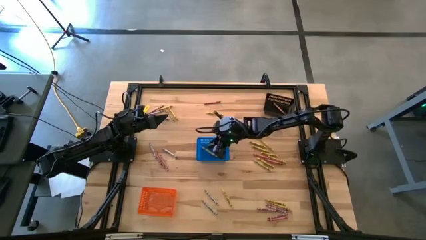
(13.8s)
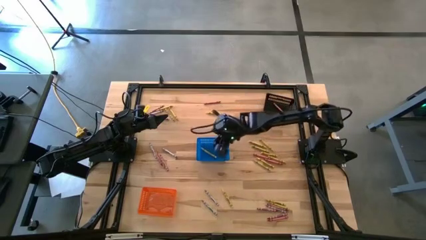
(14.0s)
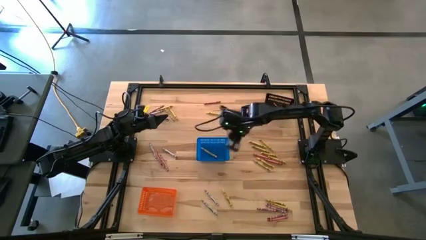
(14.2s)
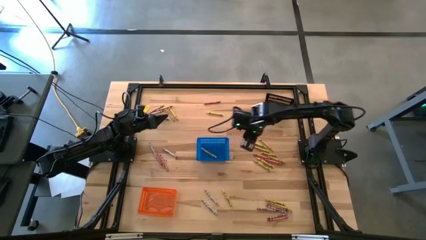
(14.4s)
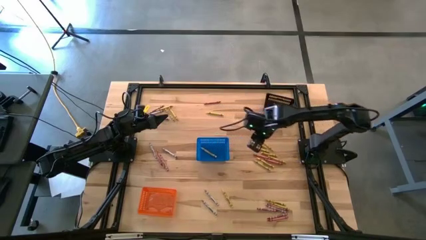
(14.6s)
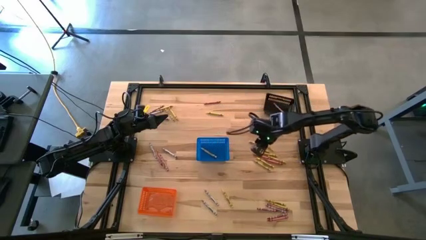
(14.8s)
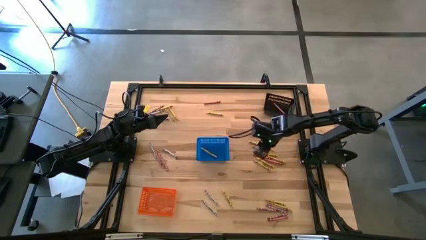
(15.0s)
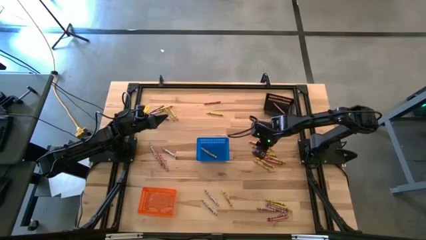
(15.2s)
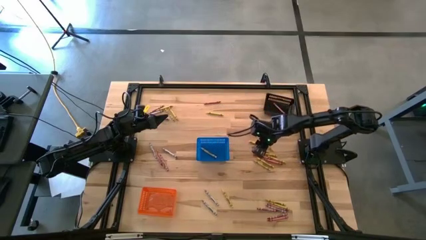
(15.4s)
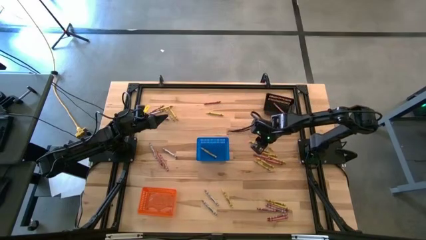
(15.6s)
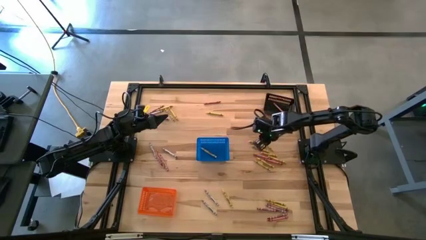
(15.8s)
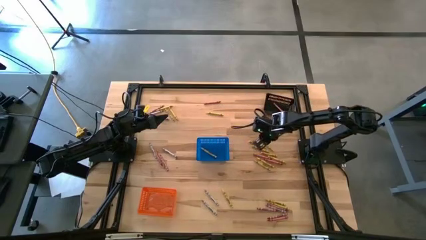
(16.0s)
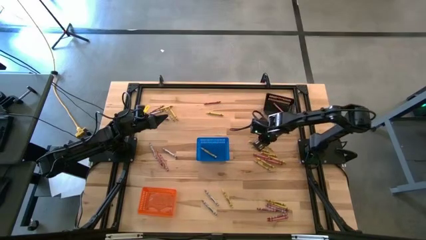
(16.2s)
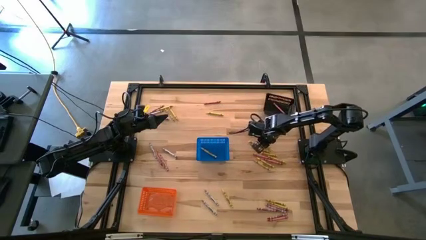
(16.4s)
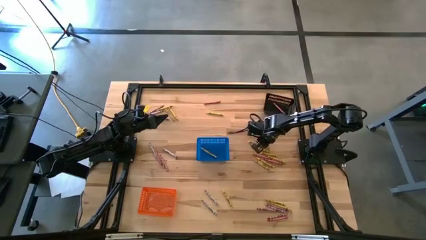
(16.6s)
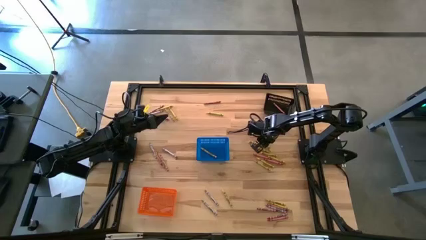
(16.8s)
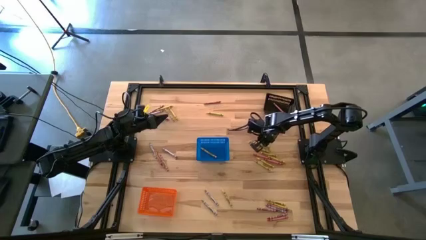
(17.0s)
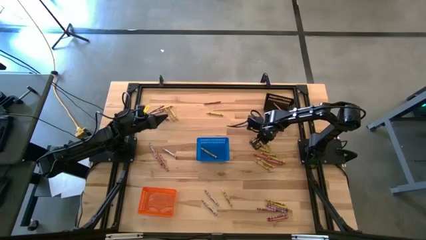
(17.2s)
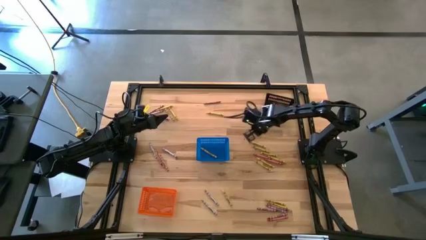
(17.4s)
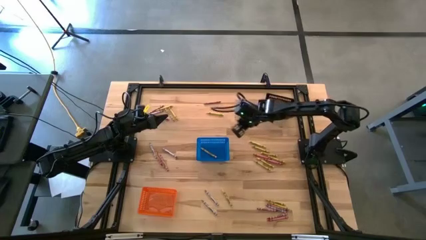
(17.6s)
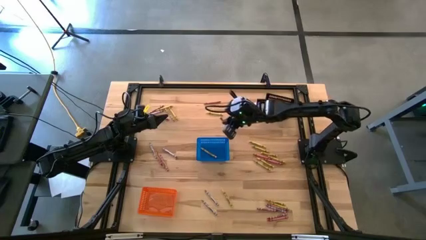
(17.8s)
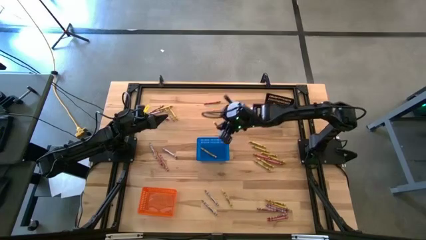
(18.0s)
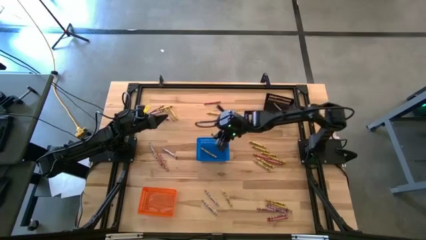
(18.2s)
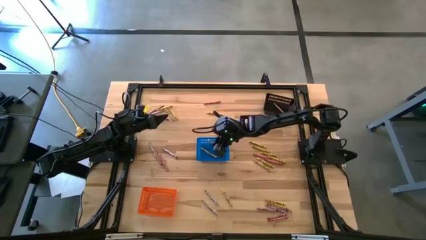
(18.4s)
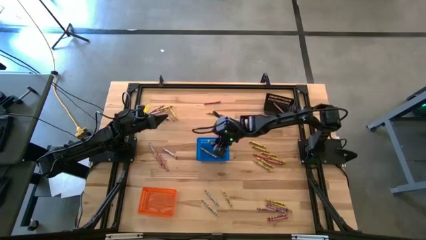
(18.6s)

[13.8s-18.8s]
Task: Sort crayons
Put the yellow crayon into the blue basket

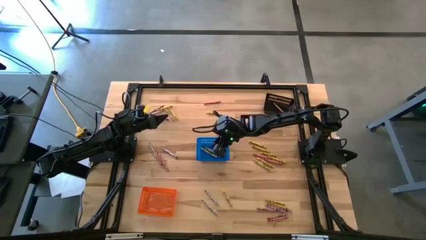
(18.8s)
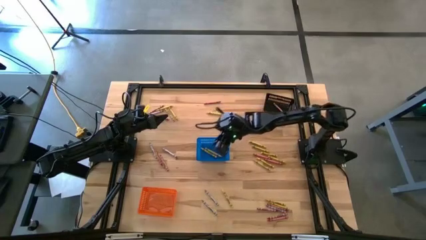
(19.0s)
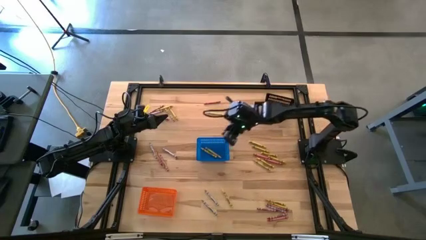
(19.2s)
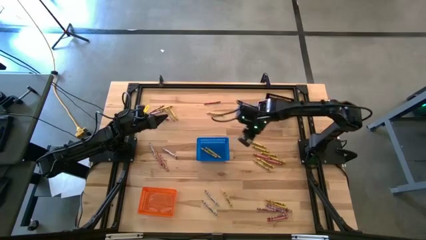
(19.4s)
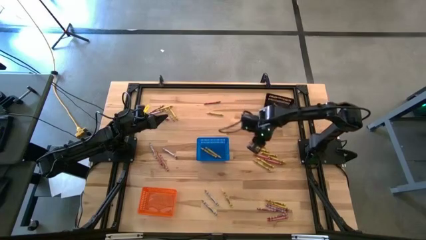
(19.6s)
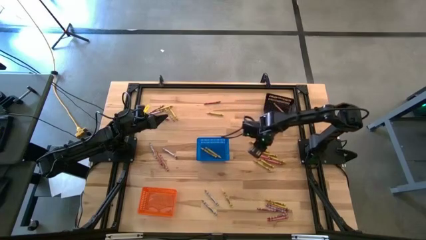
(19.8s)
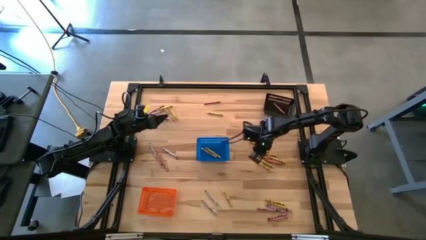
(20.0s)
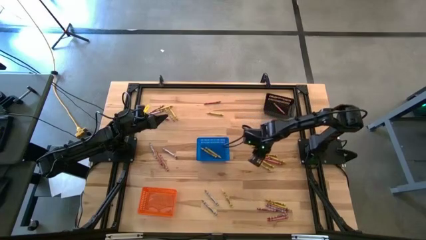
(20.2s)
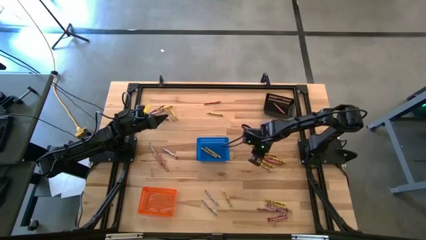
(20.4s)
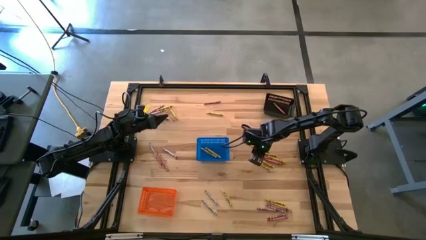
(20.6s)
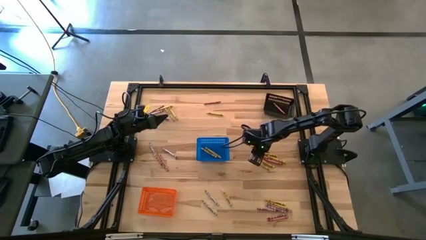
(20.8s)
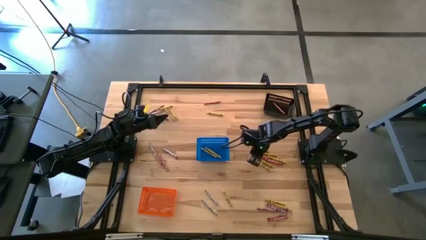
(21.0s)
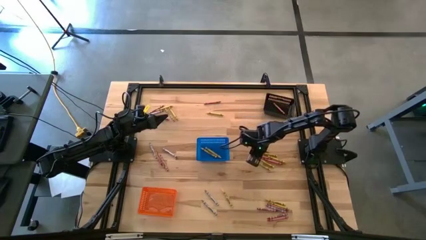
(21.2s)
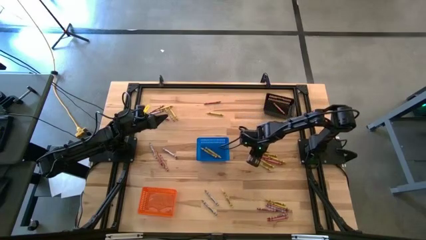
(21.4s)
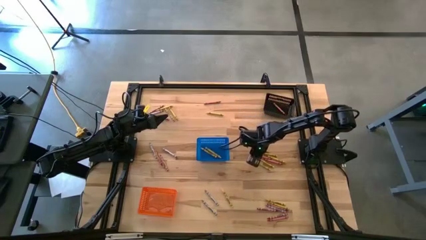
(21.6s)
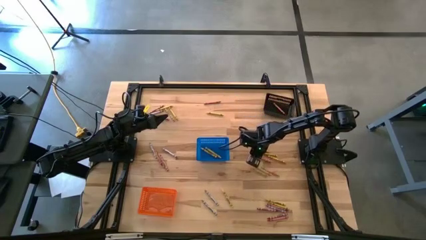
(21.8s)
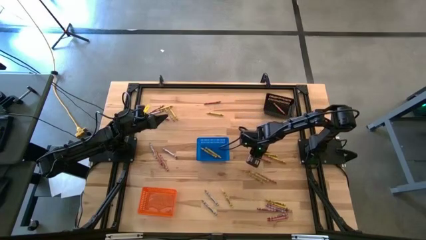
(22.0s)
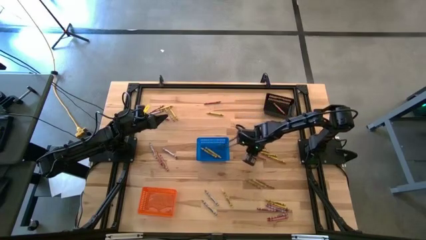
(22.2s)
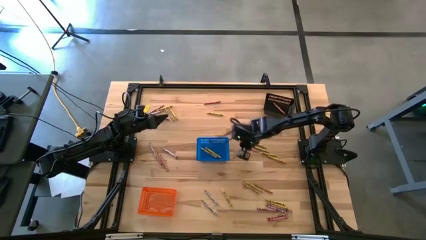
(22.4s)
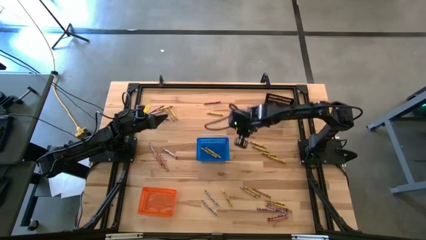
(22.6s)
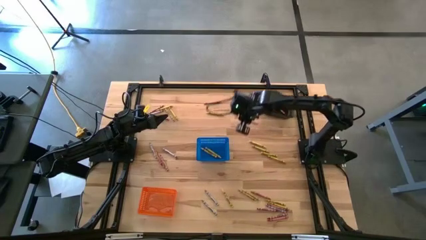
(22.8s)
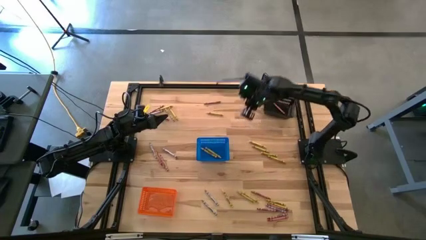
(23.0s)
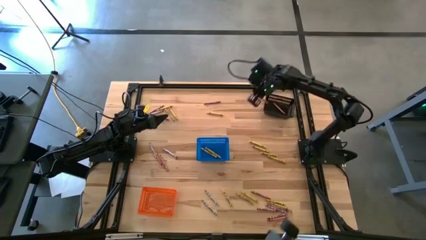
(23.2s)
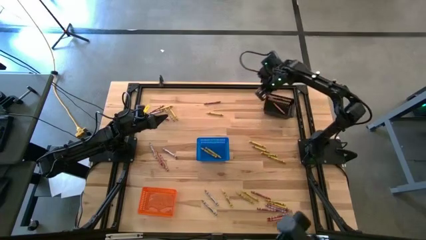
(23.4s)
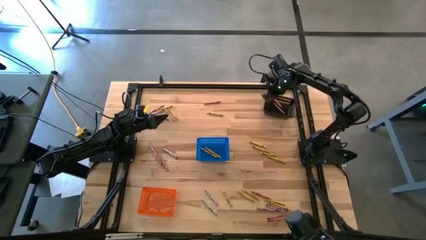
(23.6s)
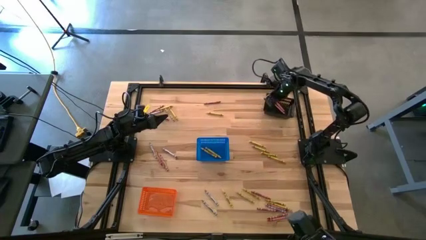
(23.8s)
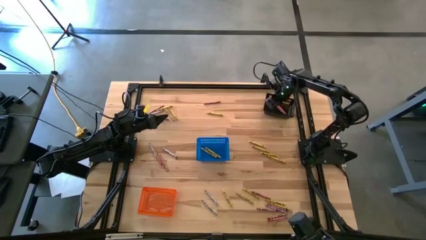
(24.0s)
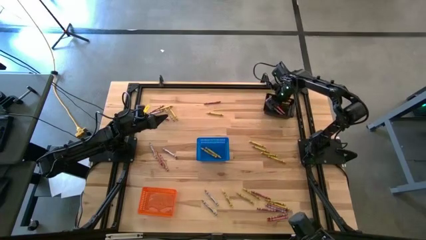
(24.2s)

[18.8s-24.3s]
Put the red crayon into the black basket

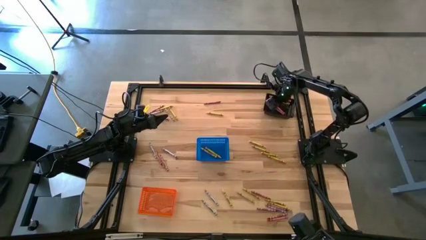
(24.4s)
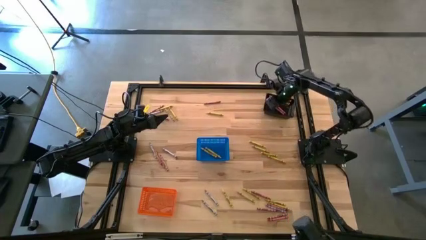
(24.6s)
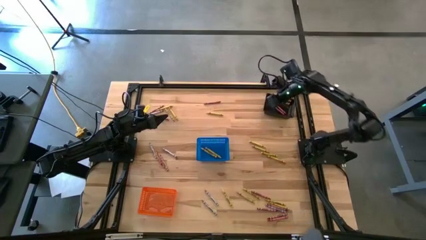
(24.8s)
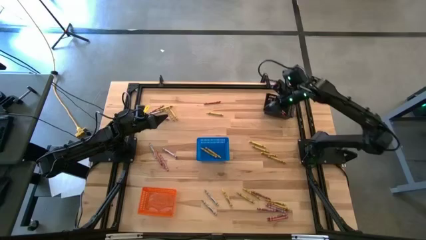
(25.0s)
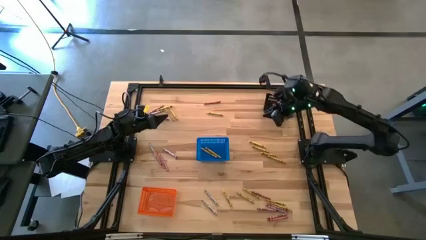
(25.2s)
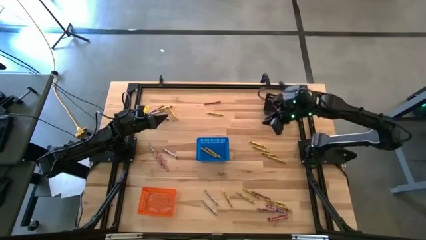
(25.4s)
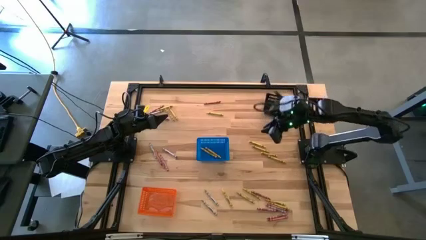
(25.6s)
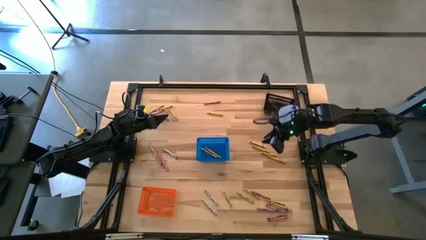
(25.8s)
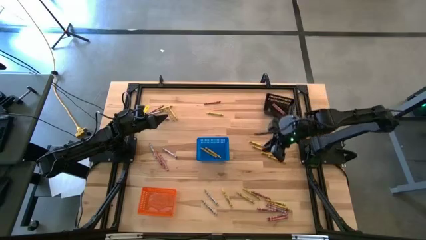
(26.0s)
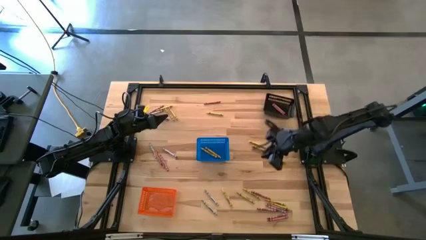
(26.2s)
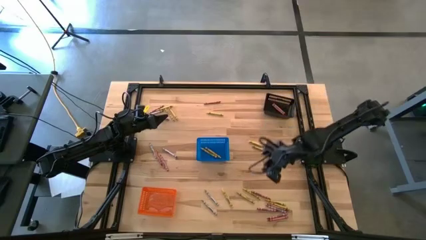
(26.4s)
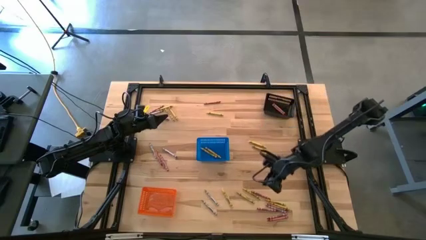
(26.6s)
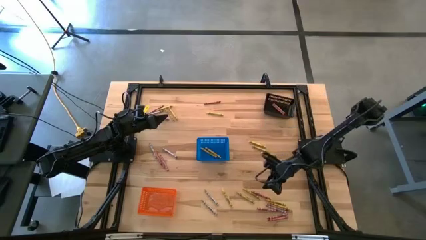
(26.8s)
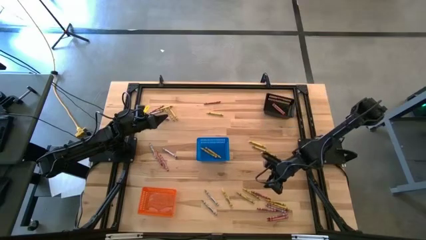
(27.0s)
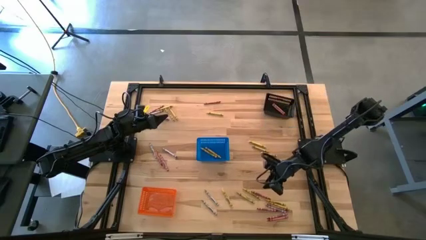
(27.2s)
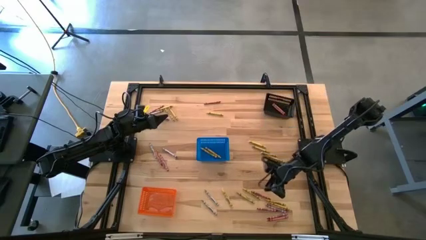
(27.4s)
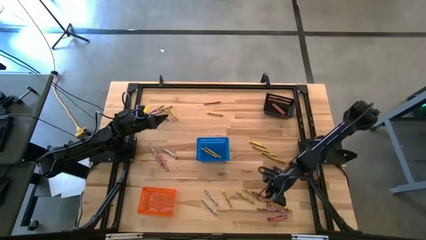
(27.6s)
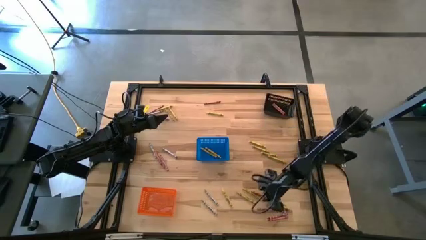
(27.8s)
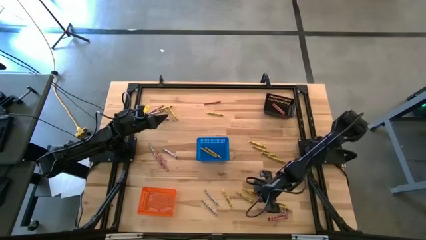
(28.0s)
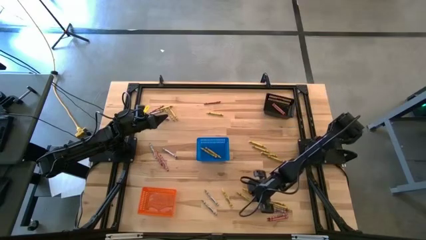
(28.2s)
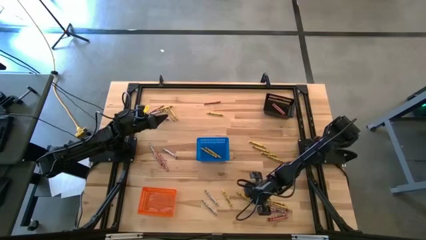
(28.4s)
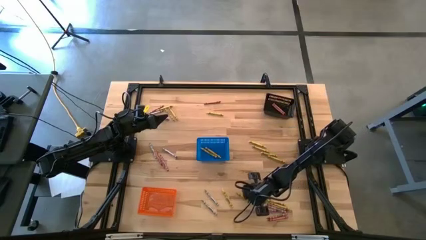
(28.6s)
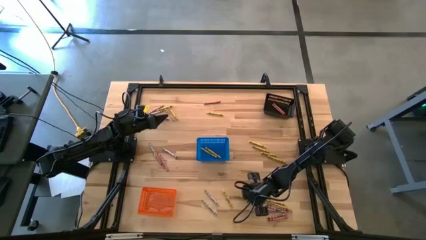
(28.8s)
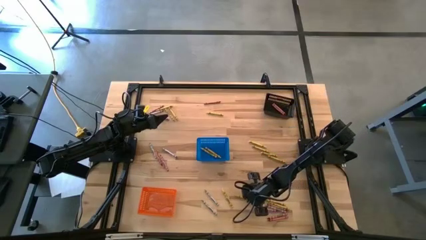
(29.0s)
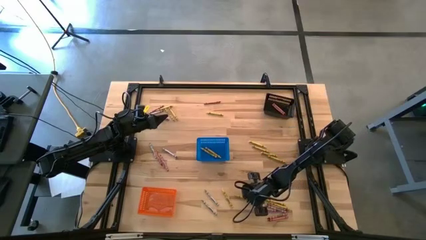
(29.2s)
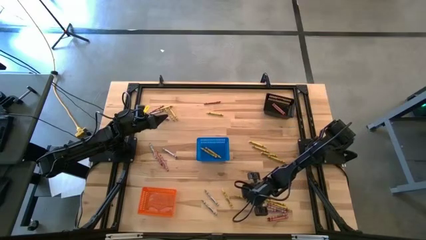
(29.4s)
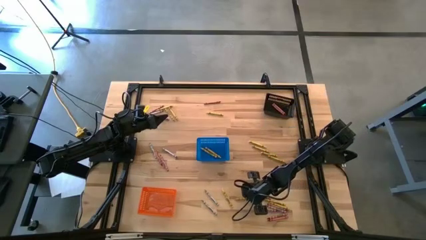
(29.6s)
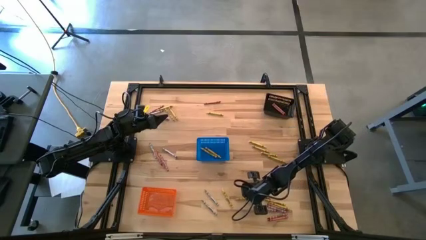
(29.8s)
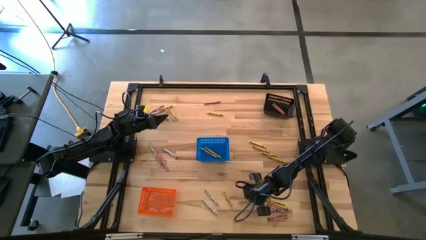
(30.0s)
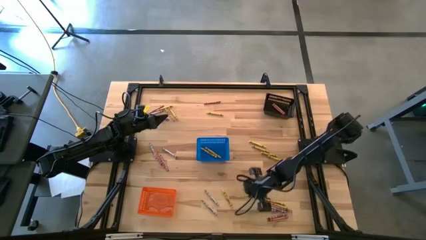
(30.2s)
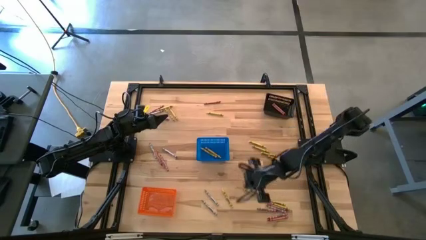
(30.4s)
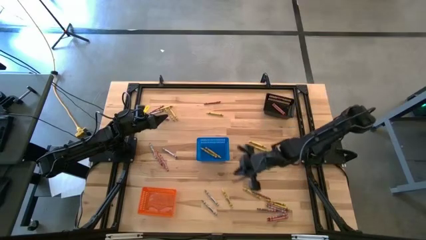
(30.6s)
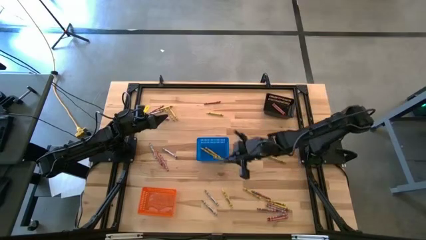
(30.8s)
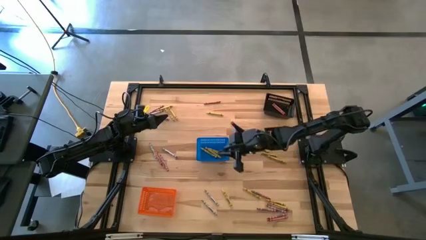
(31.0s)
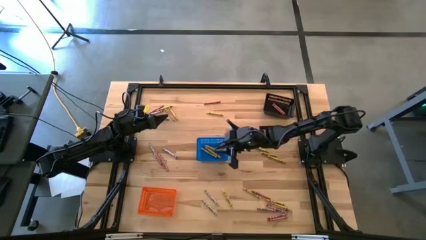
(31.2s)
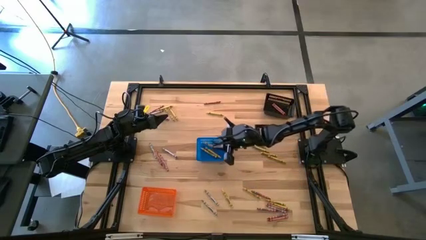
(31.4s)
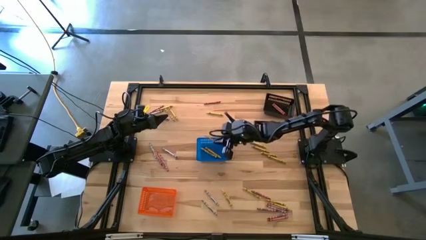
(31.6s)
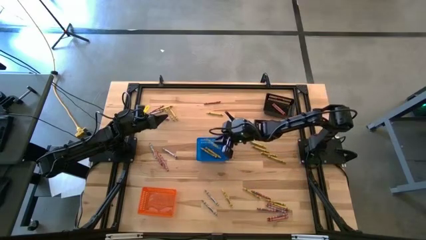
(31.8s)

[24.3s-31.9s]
Put the yellow crayon into the blue basket
